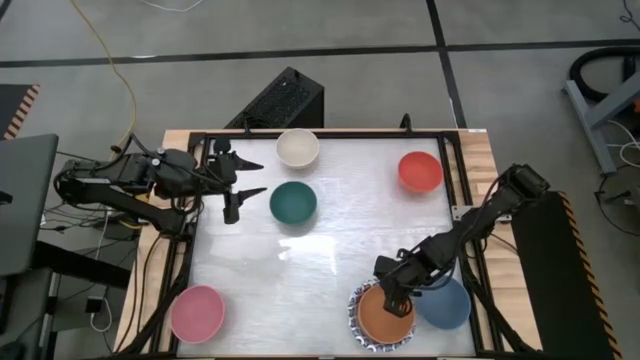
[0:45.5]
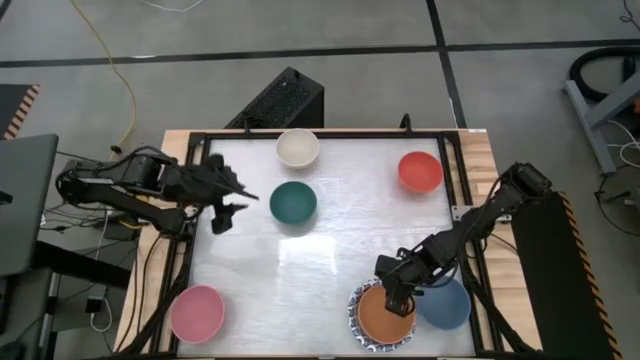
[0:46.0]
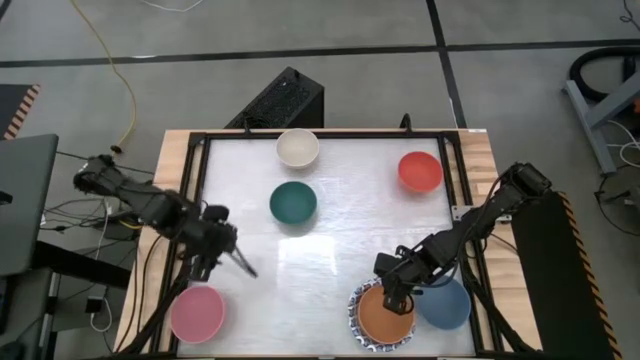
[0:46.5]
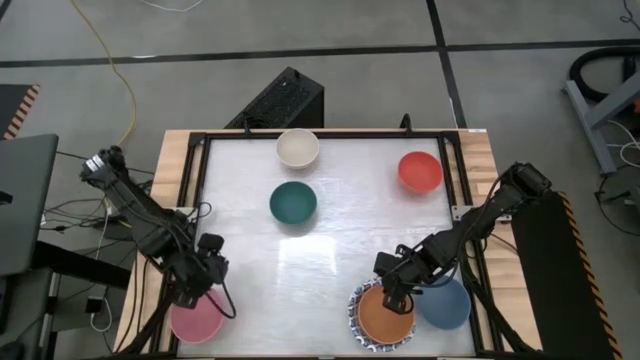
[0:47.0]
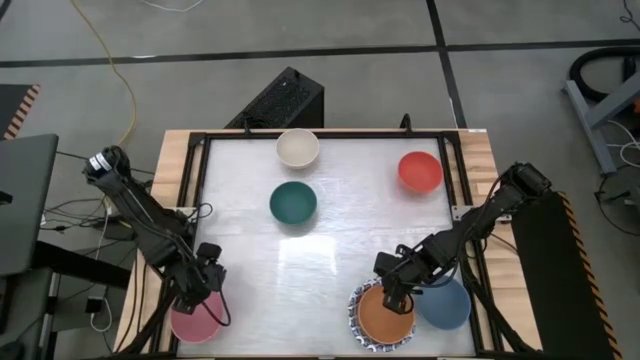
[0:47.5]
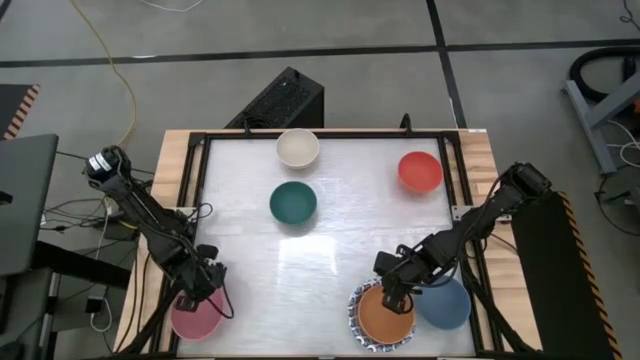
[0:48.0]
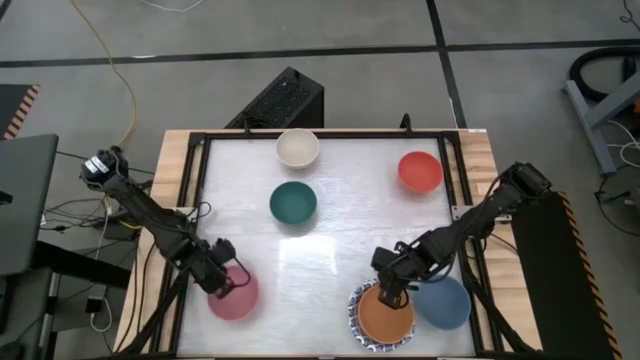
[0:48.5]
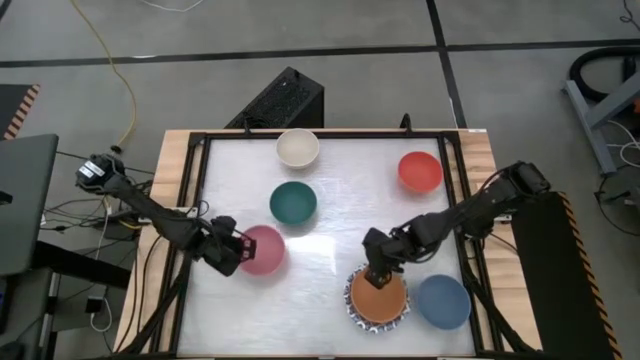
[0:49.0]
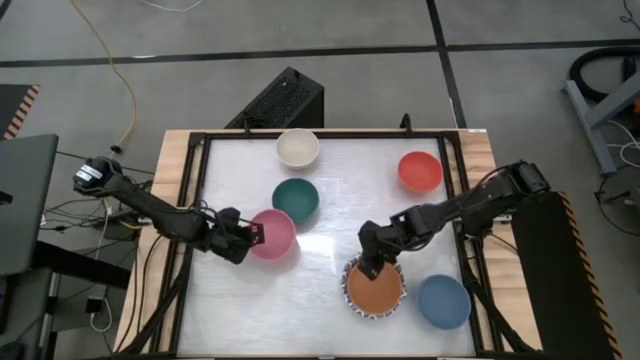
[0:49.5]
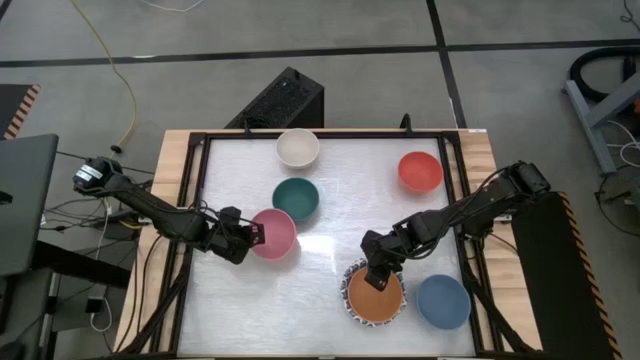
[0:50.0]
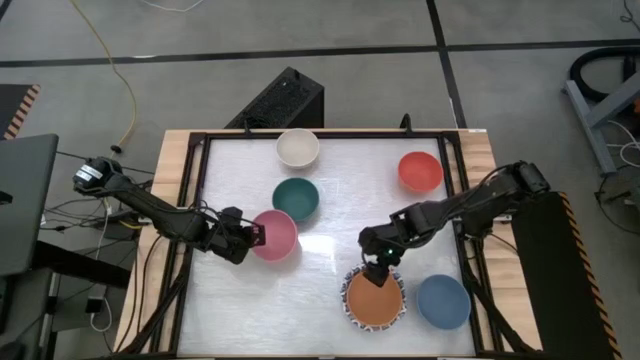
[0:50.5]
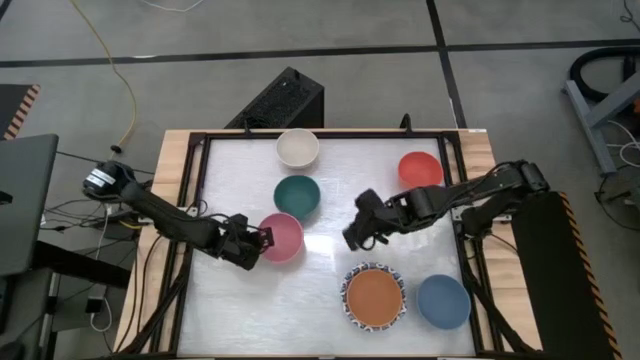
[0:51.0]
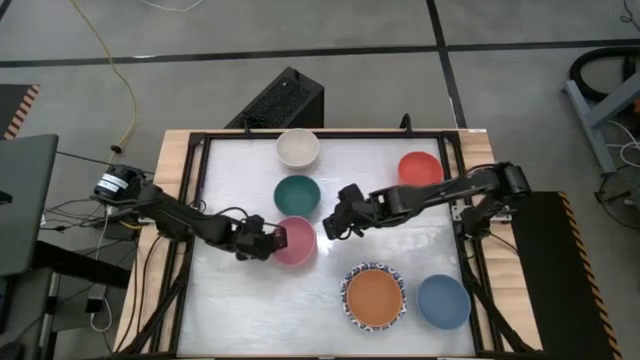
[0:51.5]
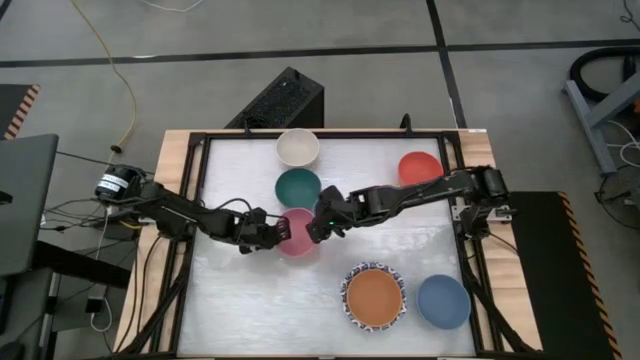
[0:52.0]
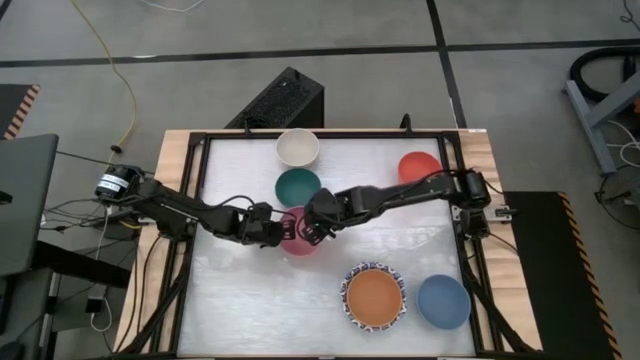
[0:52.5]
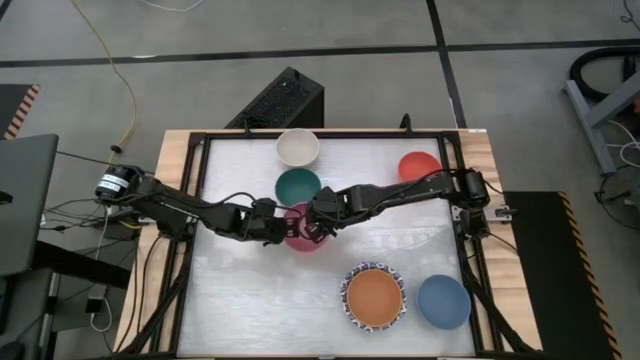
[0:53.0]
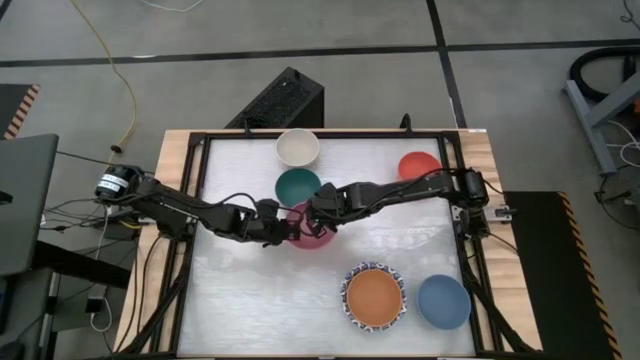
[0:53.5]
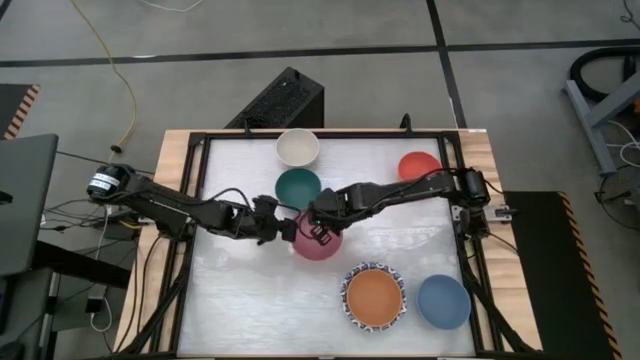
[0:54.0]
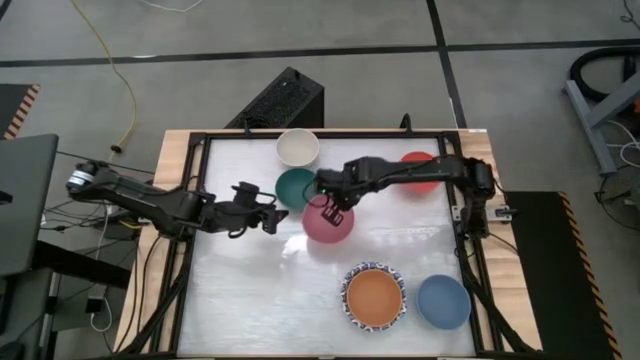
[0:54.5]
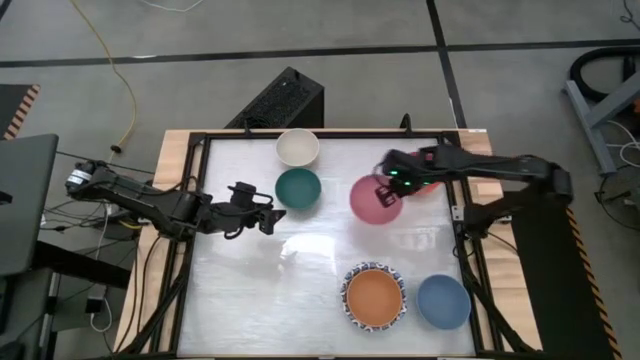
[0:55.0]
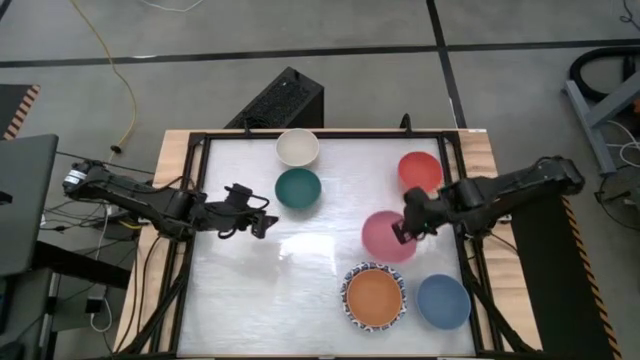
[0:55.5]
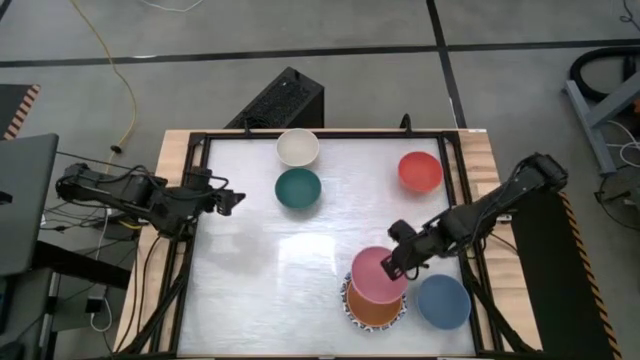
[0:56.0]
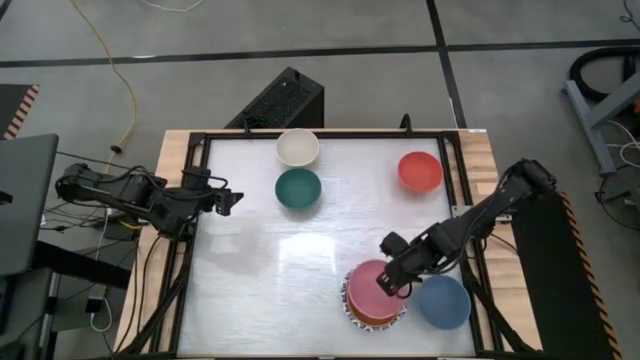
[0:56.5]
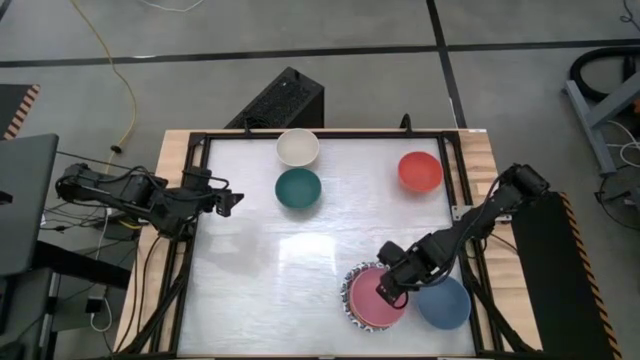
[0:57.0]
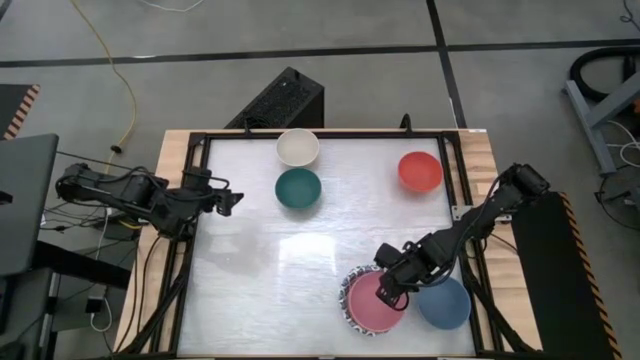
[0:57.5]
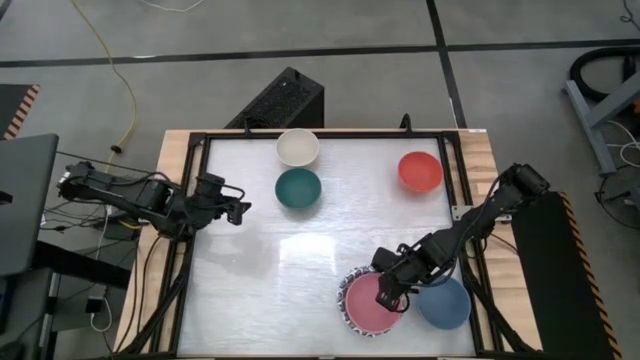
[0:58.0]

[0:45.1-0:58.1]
Stack the pink bowl on top of the light orange bowl

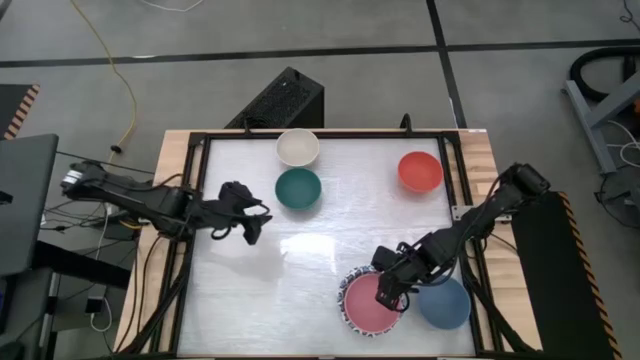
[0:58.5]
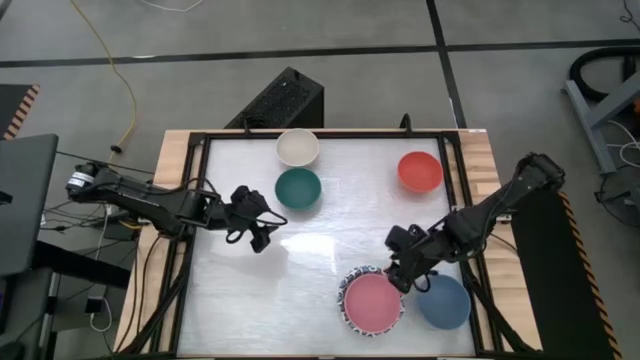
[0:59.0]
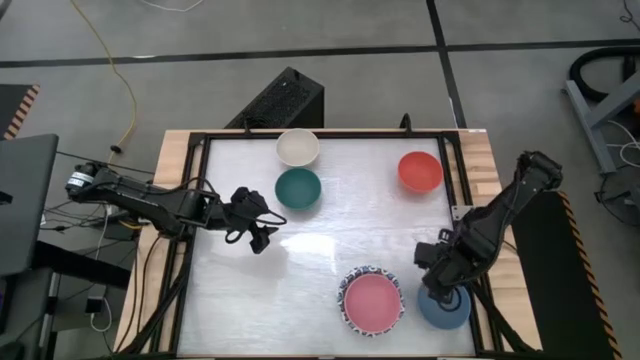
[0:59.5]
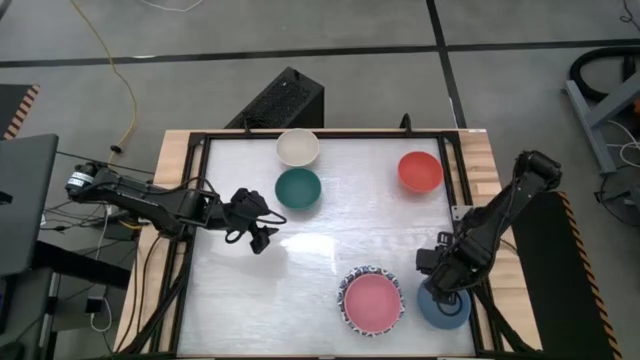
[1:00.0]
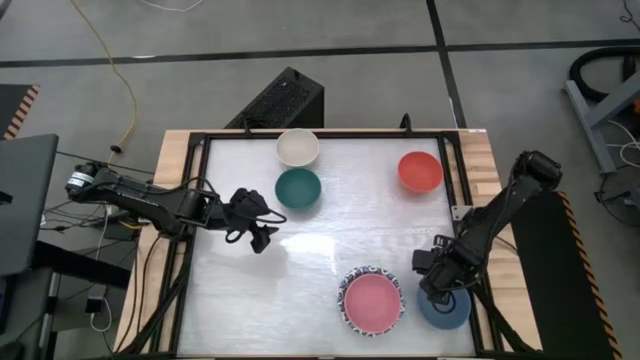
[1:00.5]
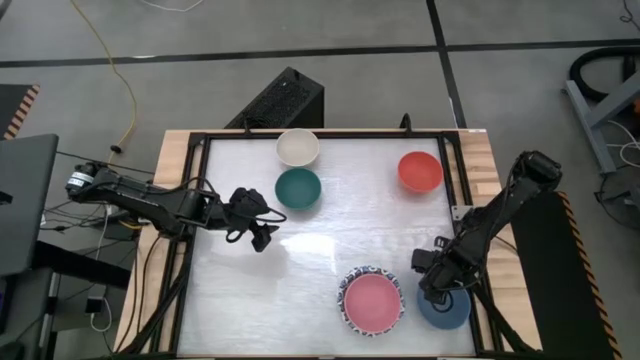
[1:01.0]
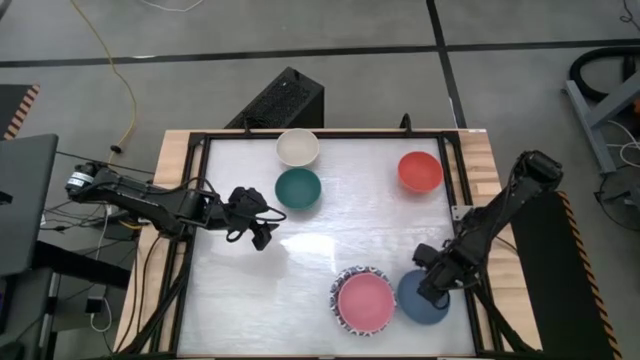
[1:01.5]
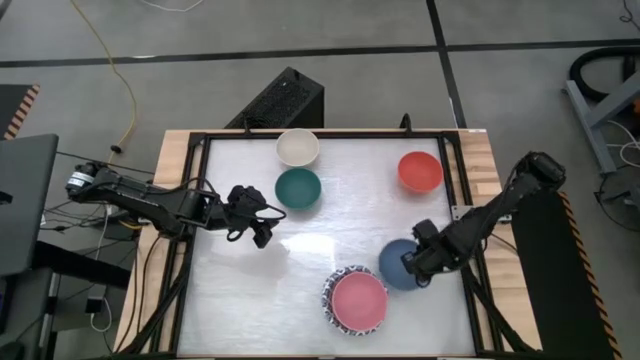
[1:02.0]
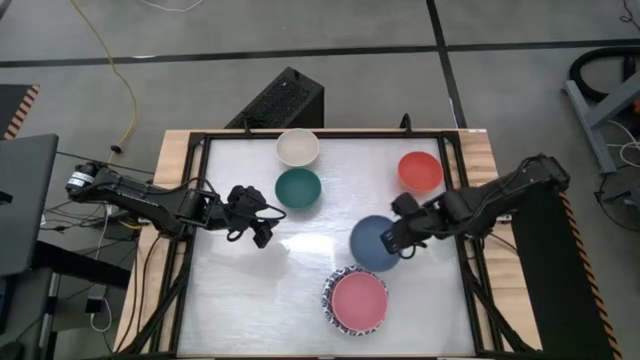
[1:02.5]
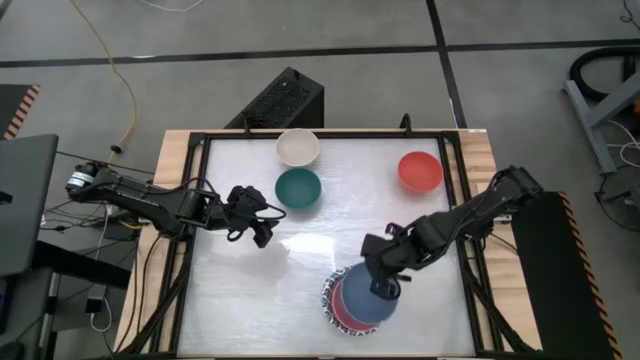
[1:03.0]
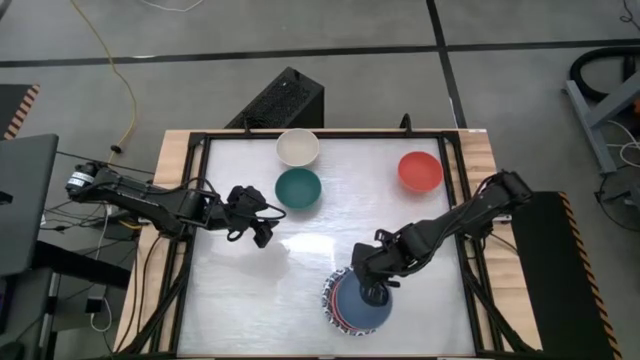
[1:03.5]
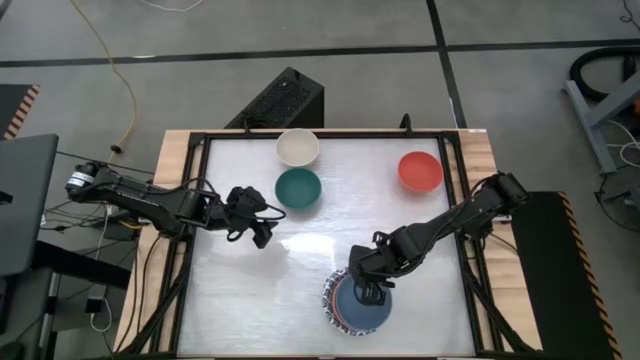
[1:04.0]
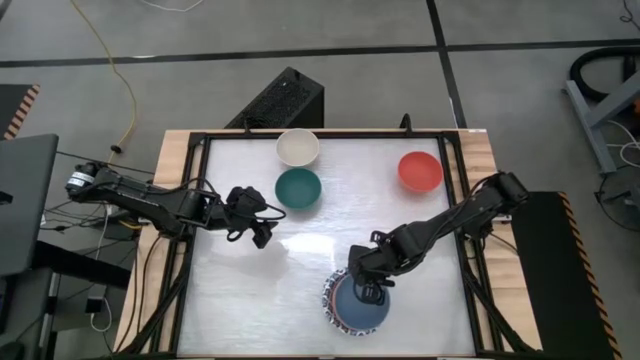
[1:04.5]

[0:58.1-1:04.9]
Stack the blue bowl on top of the pink bowl
